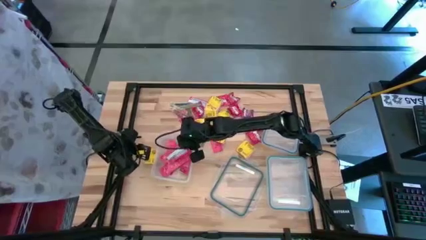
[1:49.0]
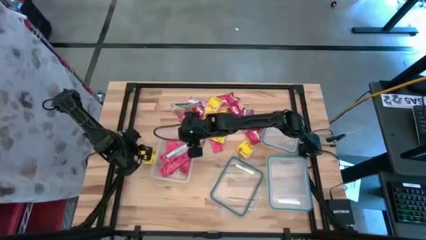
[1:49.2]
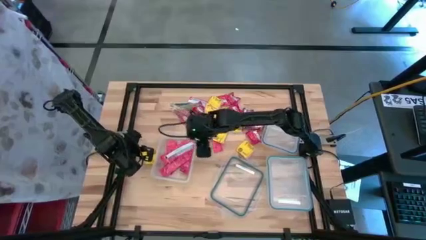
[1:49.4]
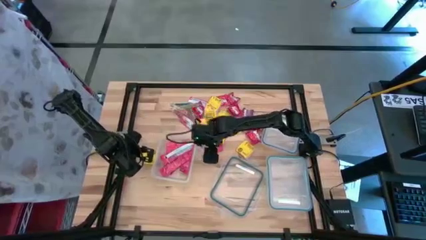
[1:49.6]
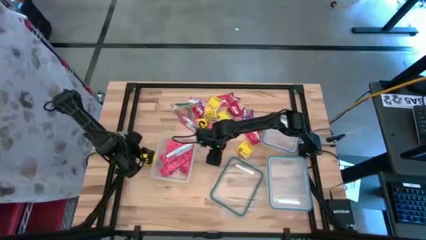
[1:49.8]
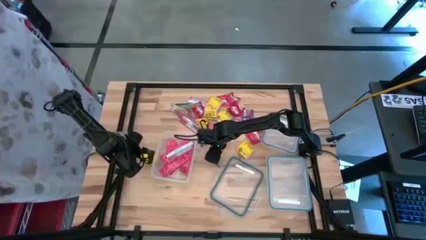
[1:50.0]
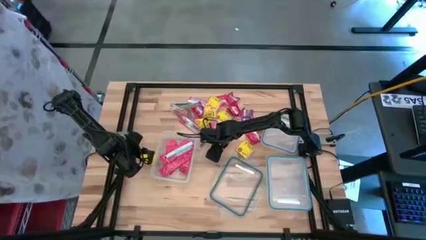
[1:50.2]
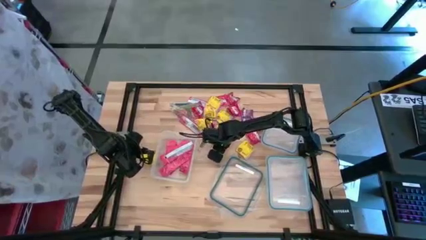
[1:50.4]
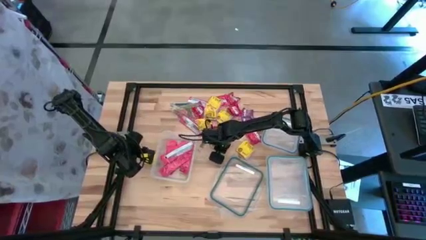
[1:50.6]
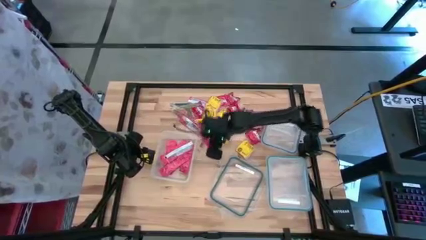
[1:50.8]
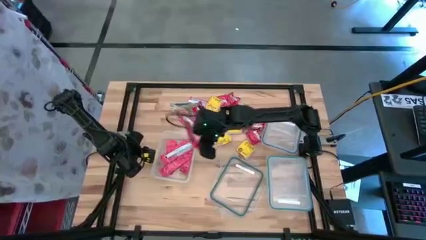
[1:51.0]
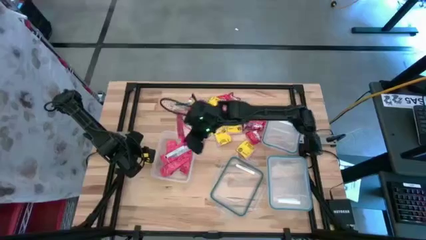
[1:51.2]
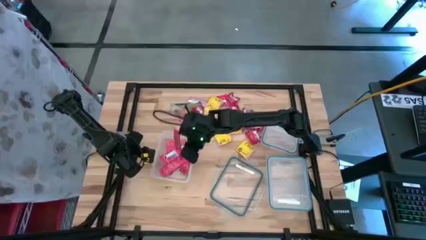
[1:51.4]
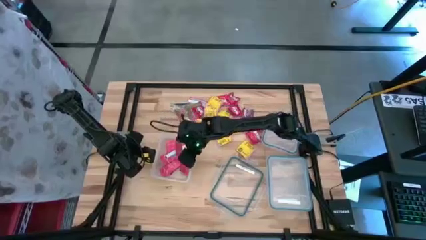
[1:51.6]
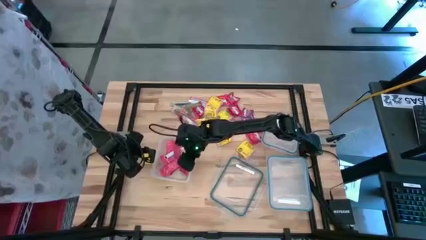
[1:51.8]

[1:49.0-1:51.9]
Task: Sort candy
Put the red candy into the open transparent container

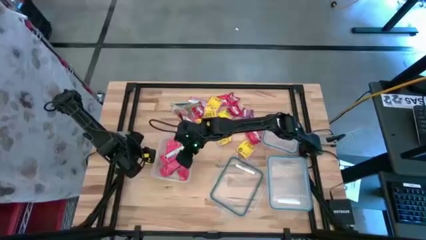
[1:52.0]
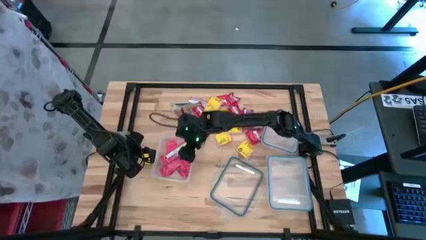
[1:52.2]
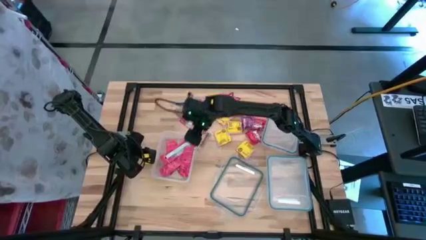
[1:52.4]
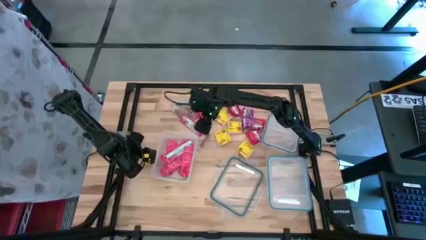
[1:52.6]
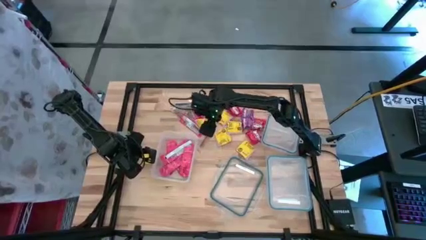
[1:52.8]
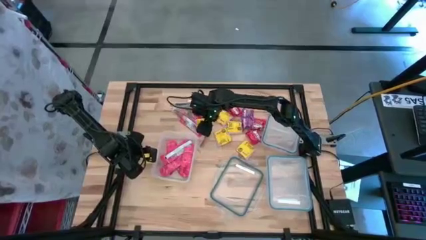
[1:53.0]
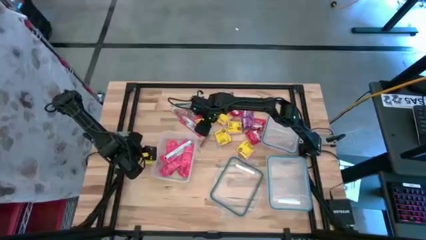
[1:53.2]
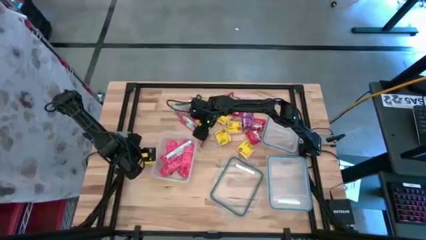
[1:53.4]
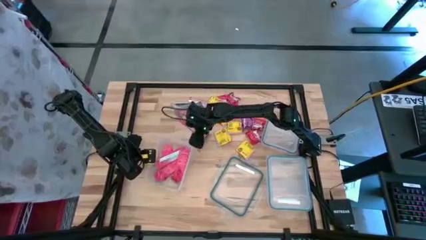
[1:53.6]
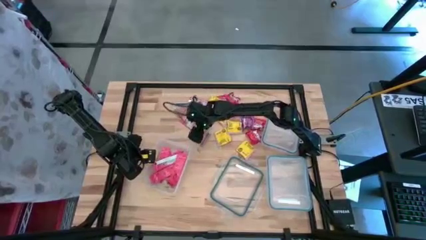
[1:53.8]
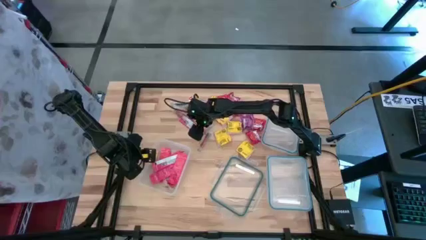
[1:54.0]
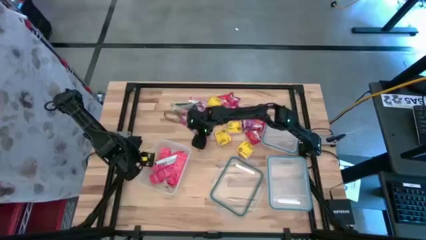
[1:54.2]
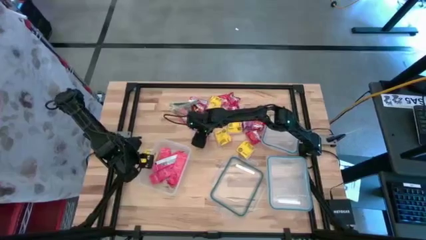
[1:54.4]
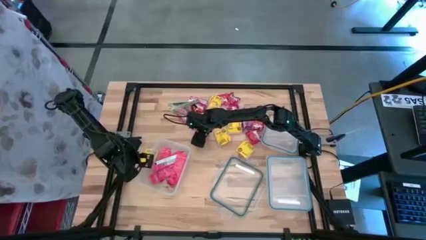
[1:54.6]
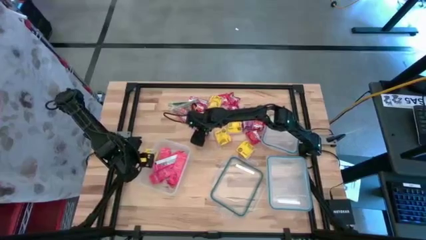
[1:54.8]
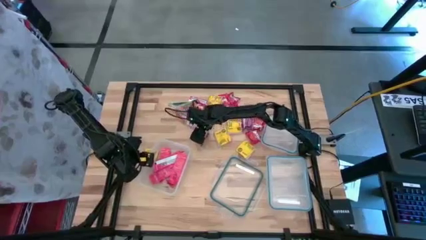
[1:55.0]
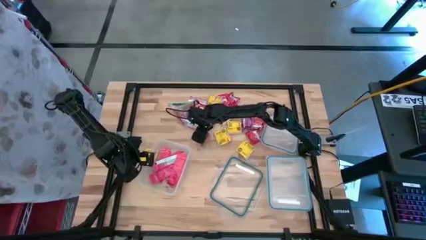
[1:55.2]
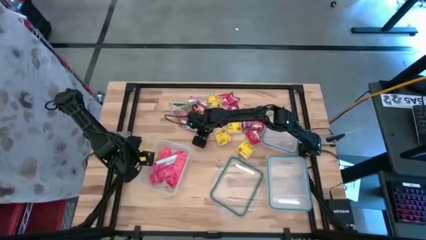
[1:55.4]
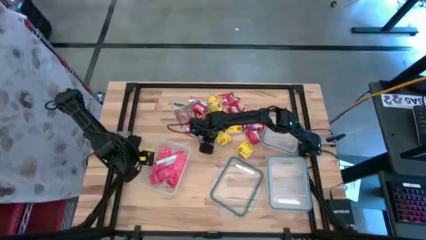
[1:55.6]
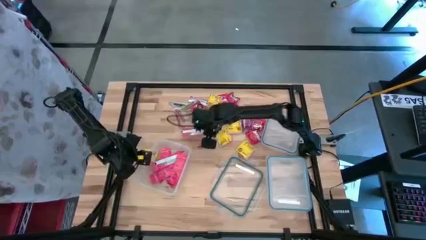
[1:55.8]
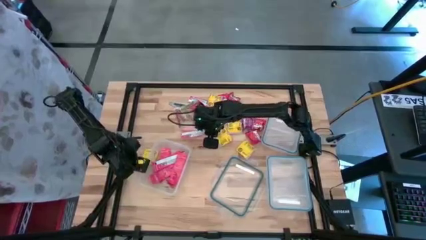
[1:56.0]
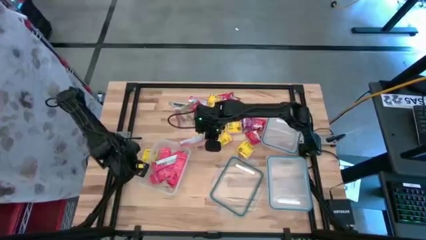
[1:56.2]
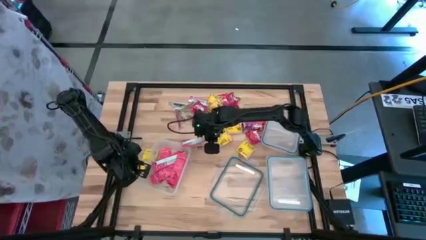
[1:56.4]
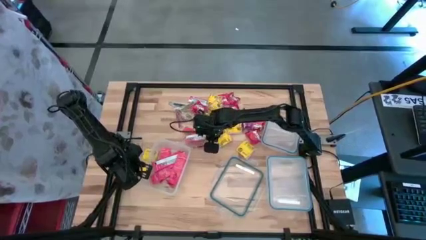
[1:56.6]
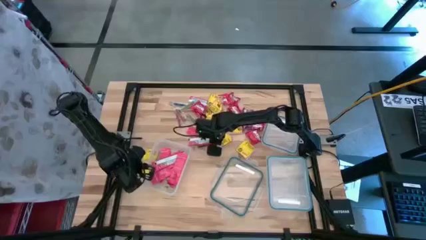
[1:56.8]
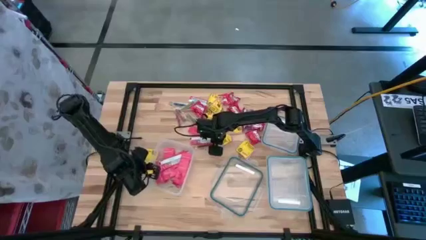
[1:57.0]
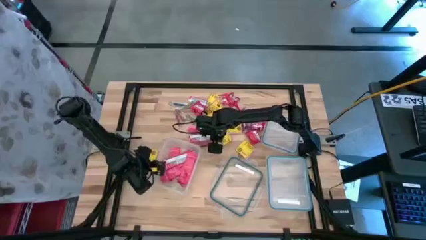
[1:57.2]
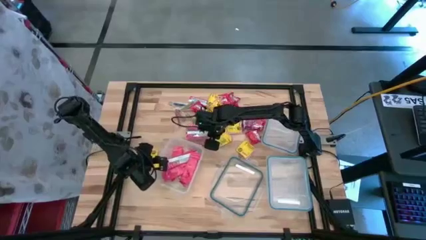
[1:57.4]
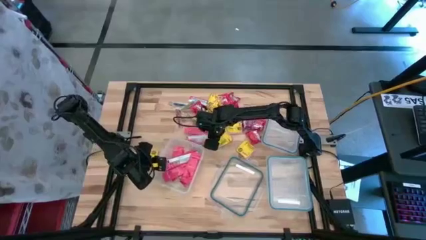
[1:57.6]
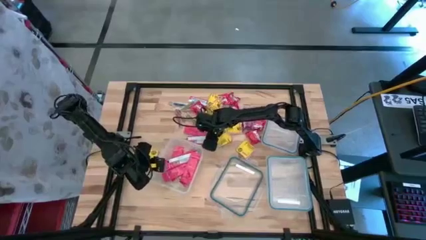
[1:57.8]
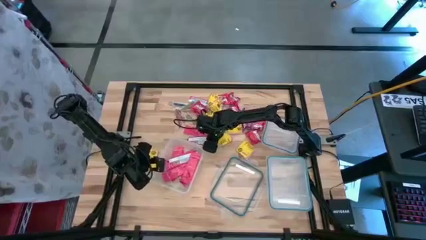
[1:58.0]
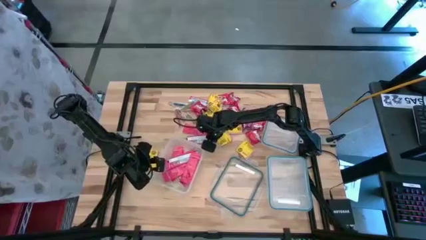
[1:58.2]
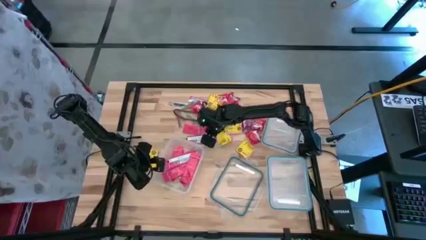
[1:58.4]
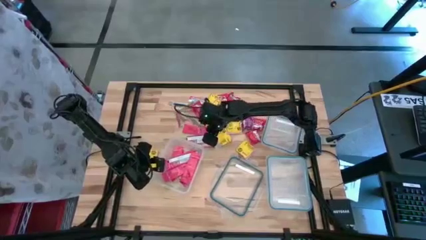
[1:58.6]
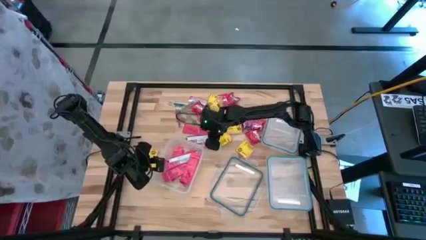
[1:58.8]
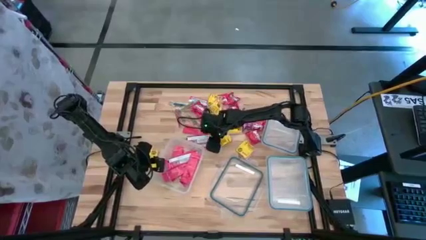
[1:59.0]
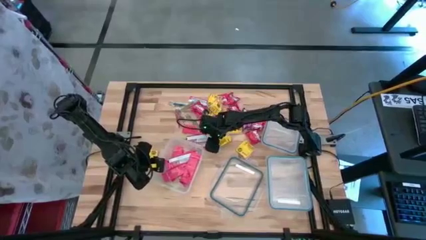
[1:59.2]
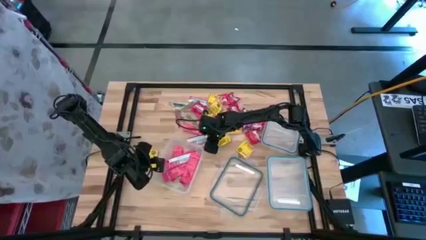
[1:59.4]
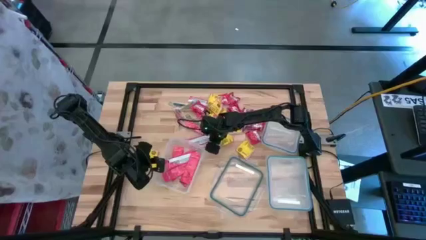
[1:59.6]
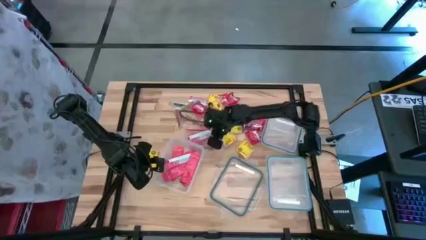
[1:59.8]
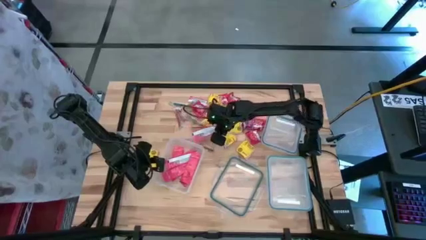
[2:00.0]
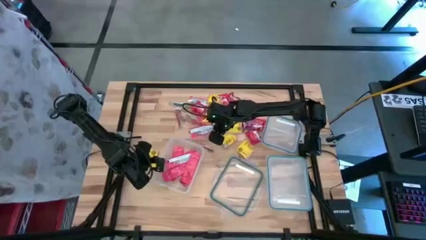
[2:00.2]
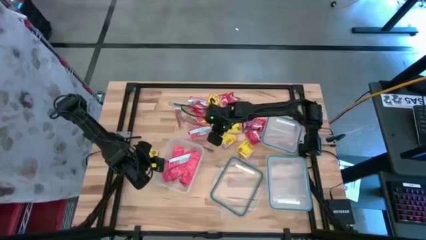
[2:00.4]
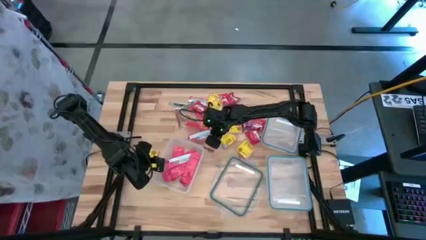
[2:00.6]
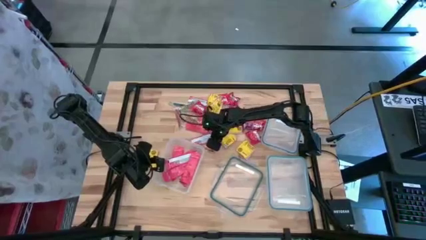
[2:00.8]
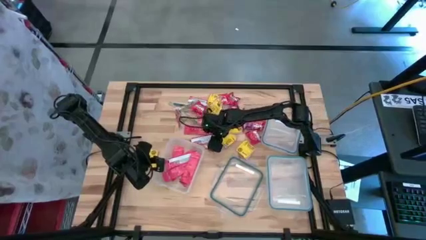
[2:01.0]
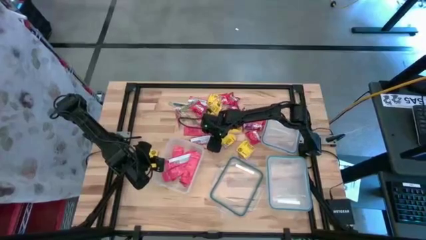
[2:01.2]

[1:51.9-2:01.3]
Put the red candy strip into the rectangular transparent bin

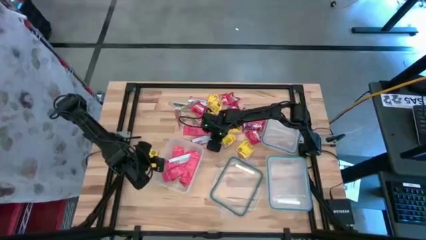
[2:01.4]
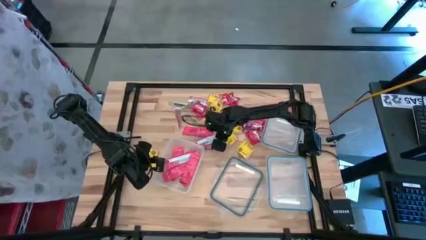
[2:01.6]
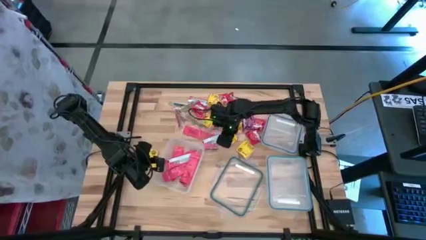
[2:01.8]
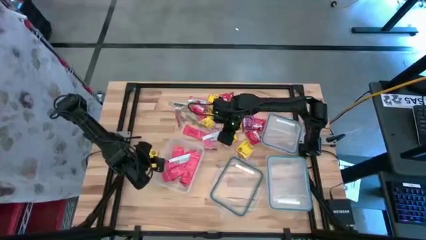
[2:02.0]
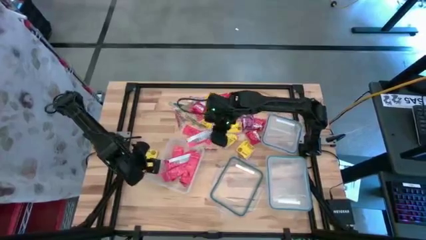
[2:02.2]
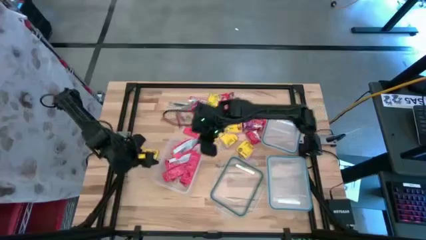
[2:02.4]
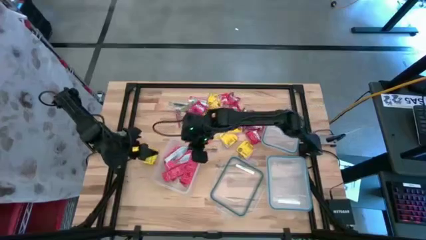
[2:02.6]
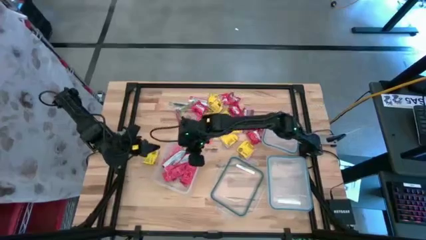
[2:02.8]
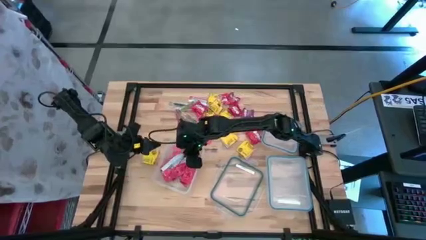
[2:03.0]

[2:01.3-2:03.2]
Put the red candy strip into the rectangular transparent bin

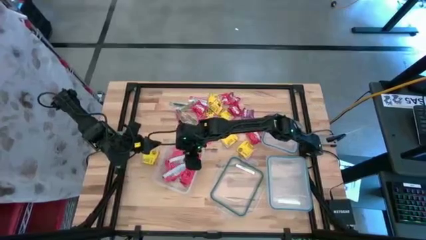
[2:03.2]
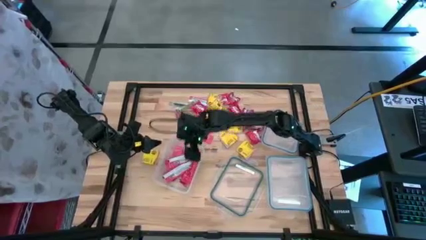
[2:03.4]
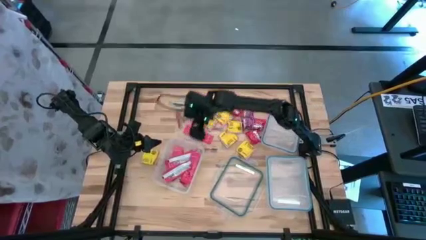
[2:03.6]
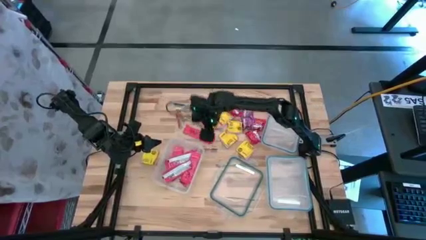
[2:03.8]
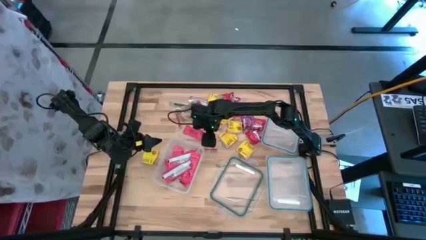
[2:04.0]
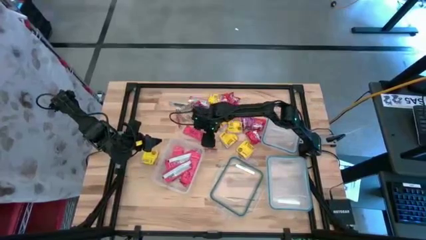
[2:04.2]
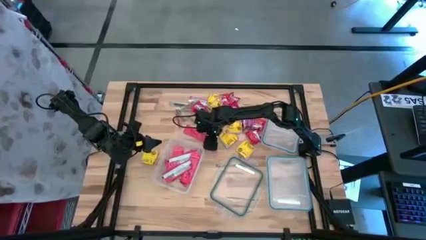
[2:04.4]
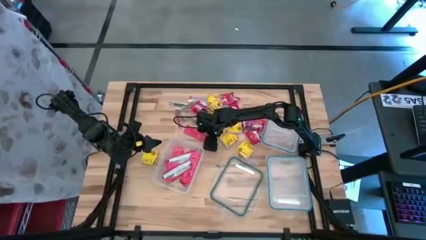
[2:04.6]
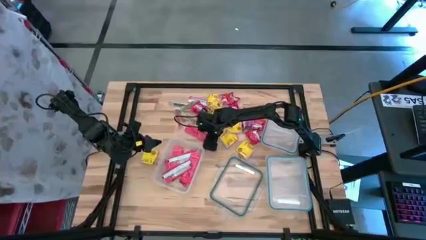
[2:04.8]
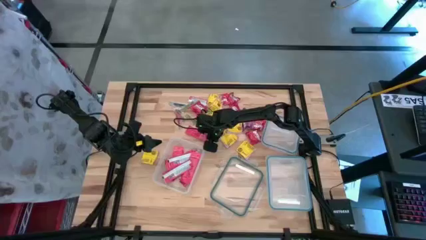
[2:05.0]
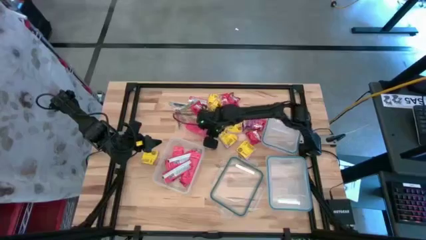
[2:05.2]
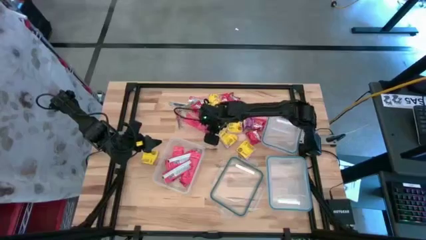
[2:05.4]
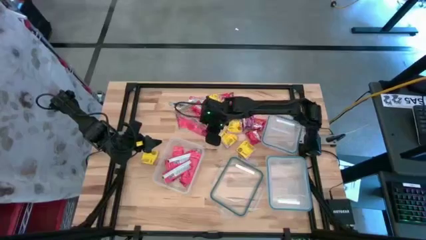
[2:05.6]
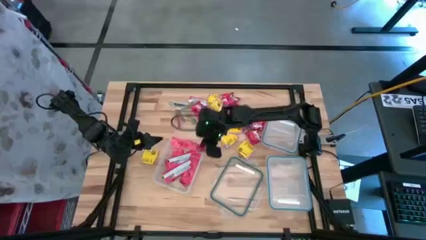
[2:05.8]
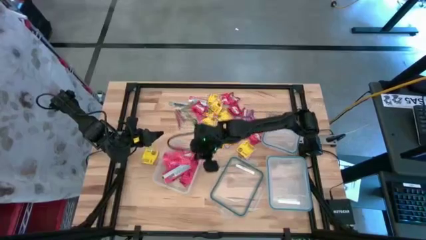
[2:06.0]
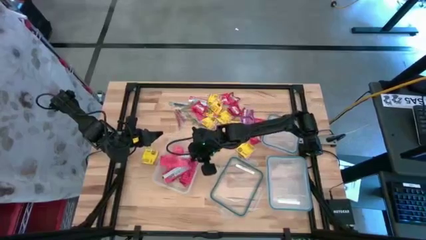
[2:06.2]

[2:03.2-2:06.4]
Put the red candy strip into the rectangular transparent bin
